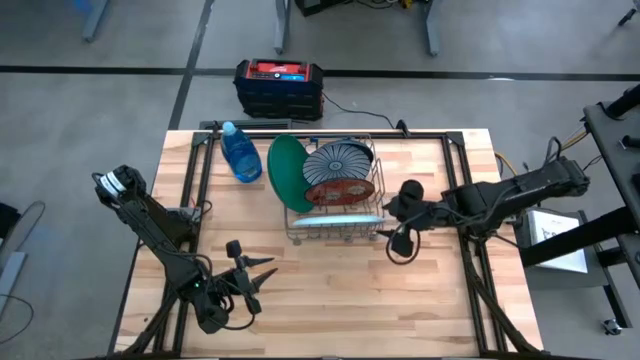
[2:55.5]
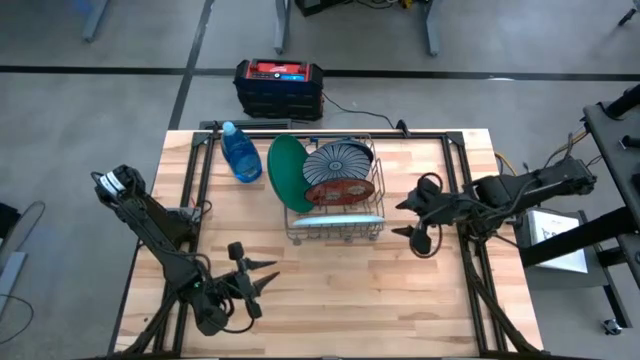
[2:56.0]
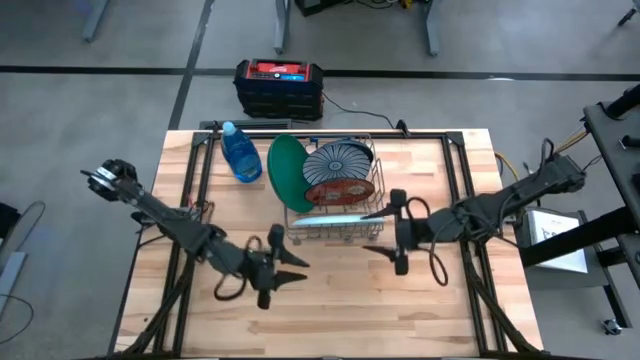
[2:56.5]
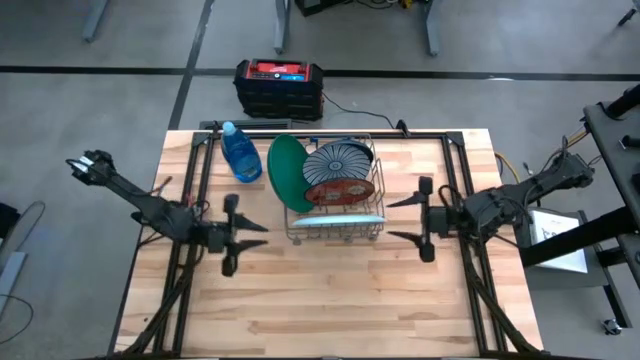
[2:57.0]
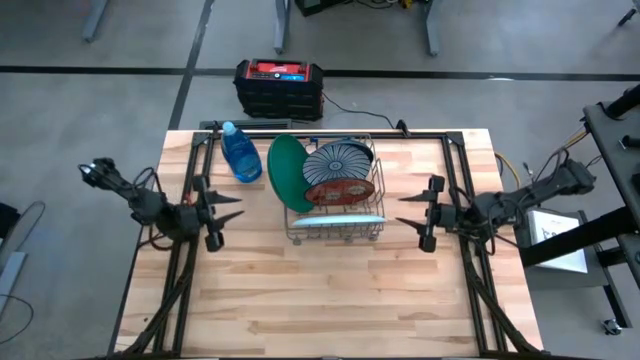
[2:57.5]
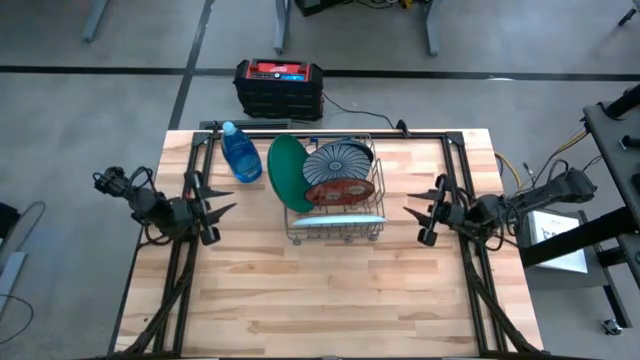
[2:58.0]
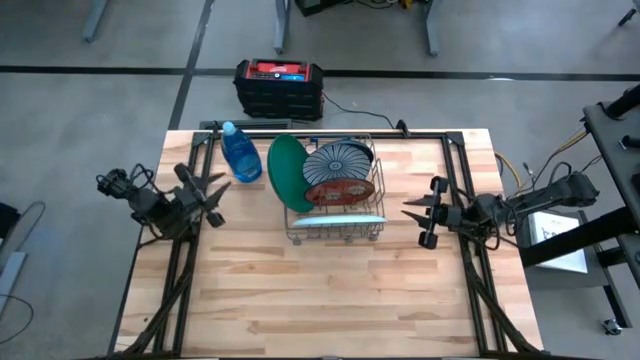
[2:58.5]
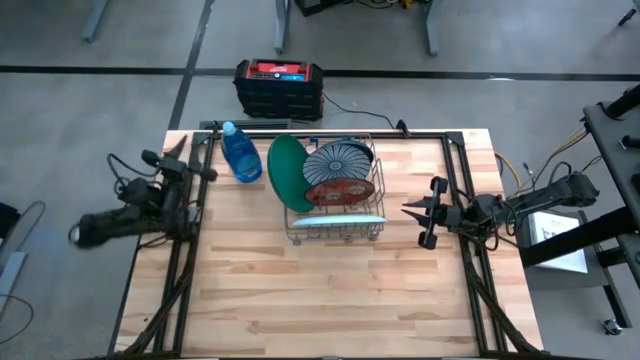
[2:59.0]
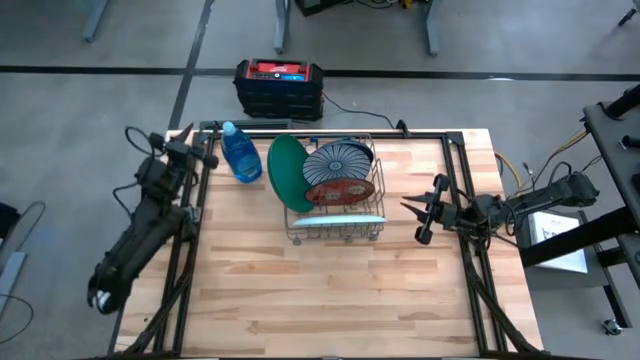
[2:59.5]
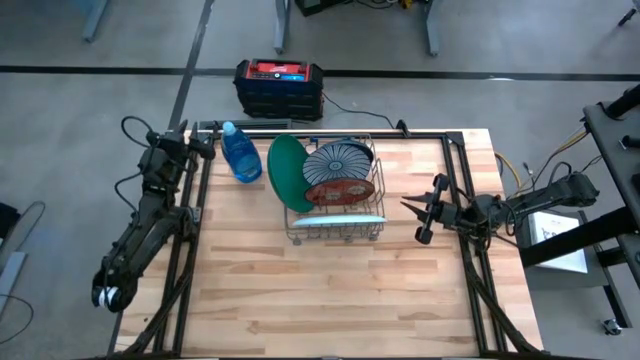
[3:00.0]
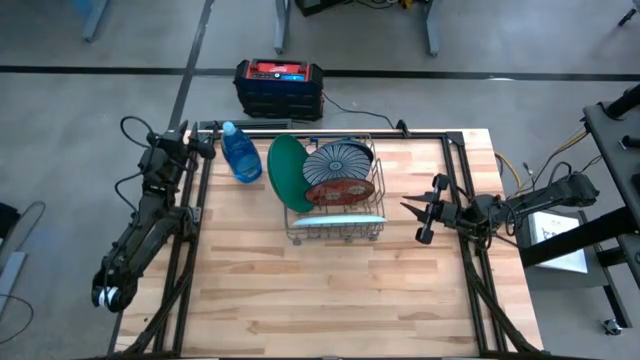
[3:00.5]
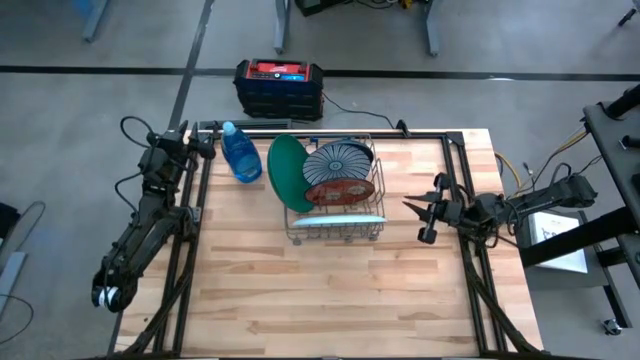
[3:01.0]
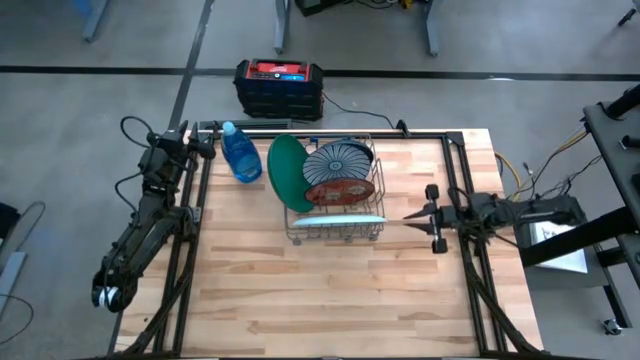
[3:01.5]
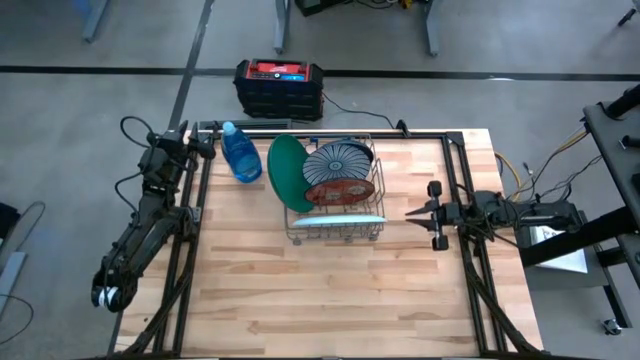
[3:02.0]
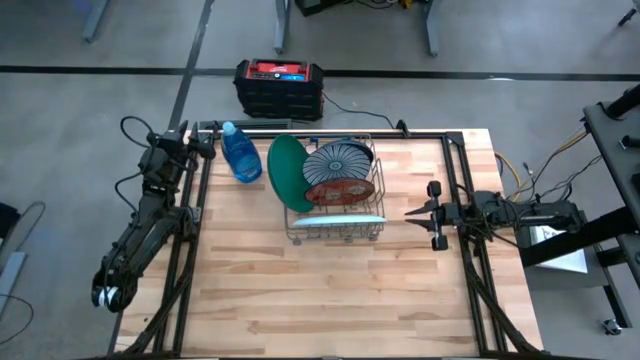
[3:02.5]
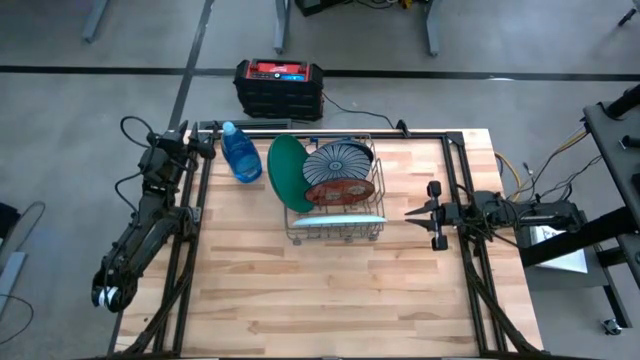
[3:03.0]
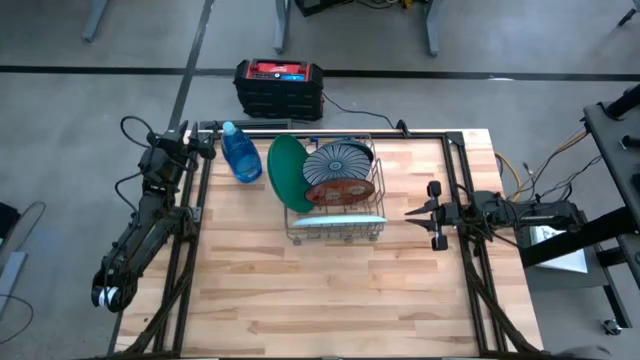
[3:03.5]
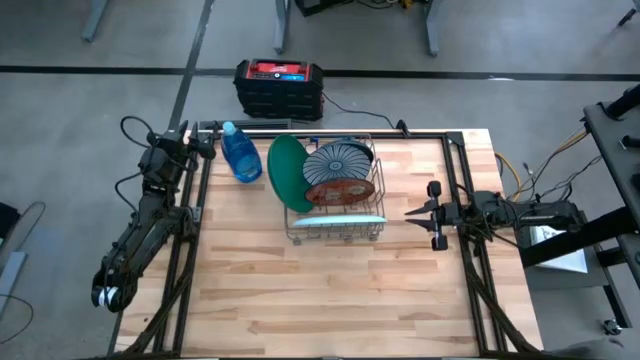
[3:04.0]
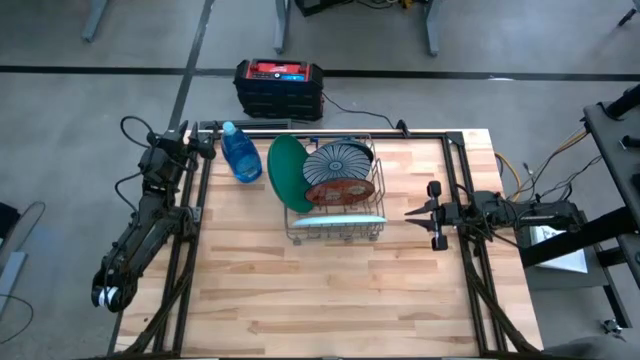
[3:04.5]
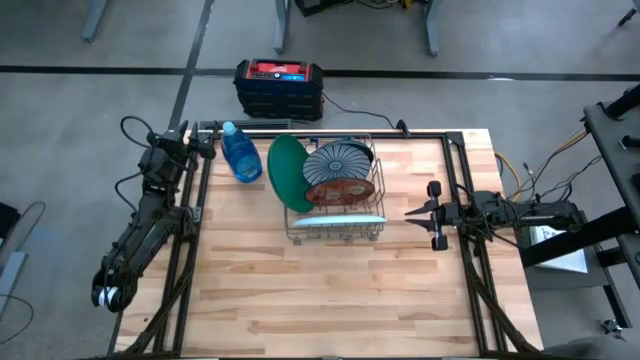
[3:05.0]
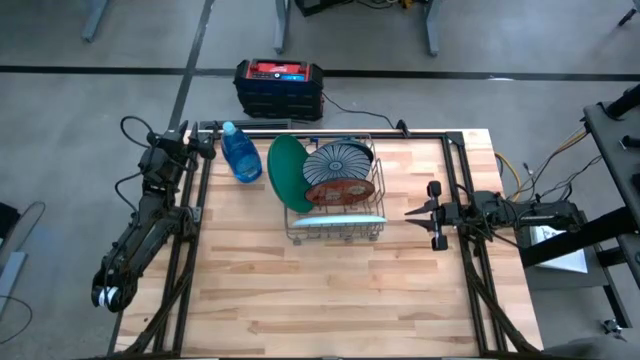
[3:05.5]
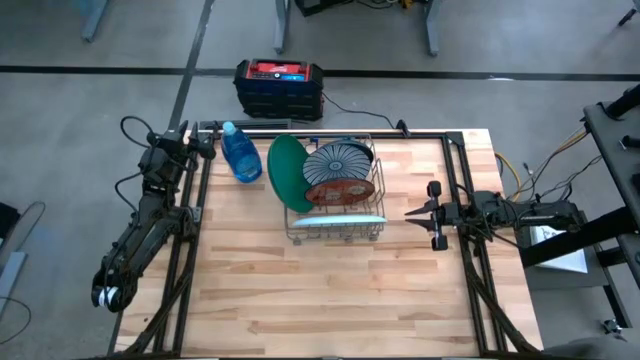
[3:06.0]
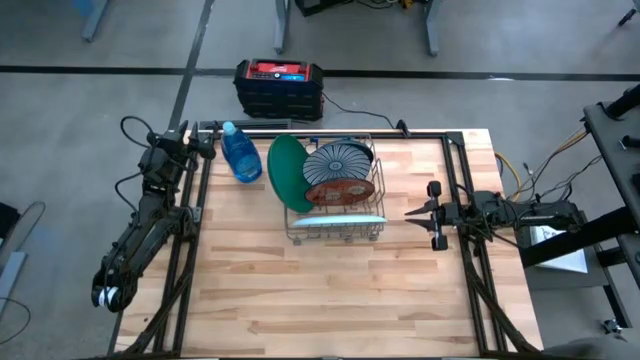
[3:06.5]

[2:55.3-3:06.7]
Task: Sort dishes
Return to Home Position

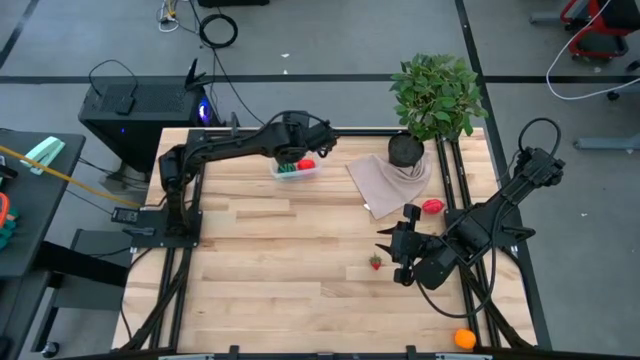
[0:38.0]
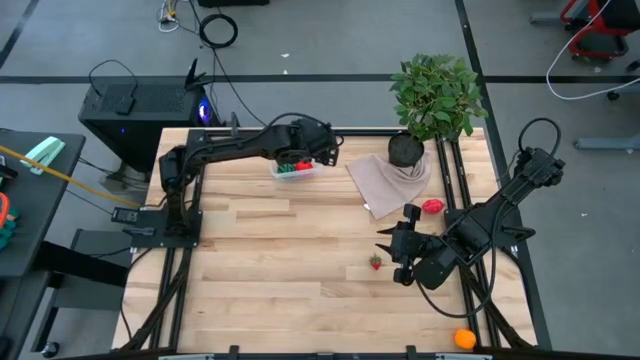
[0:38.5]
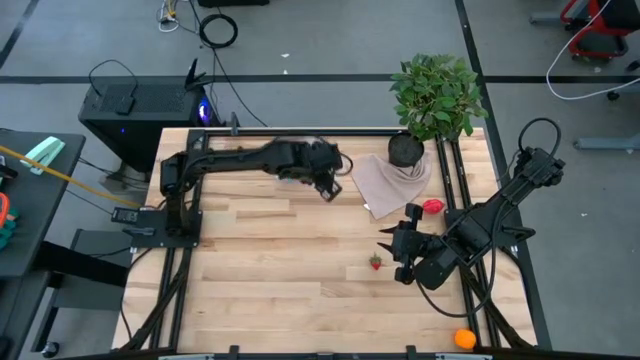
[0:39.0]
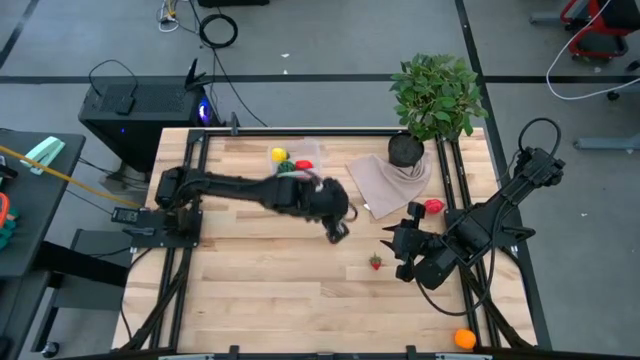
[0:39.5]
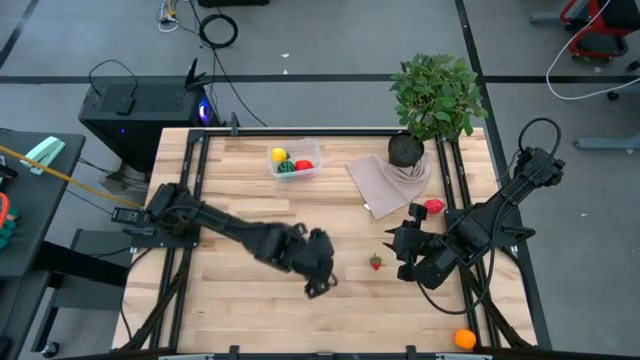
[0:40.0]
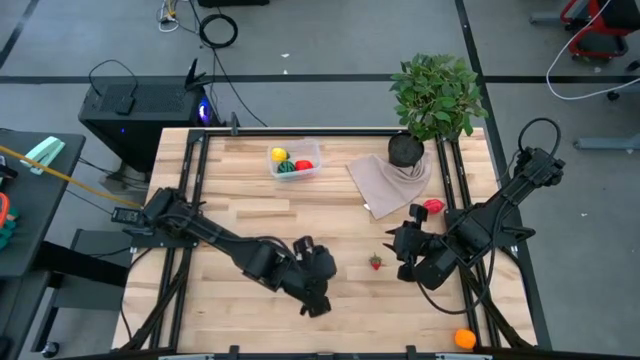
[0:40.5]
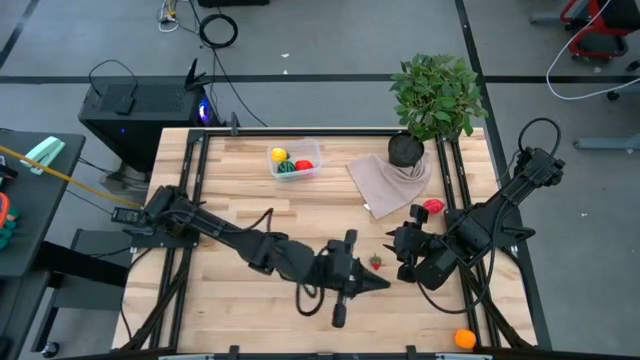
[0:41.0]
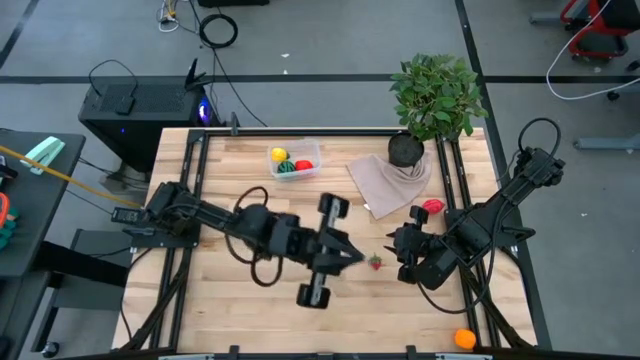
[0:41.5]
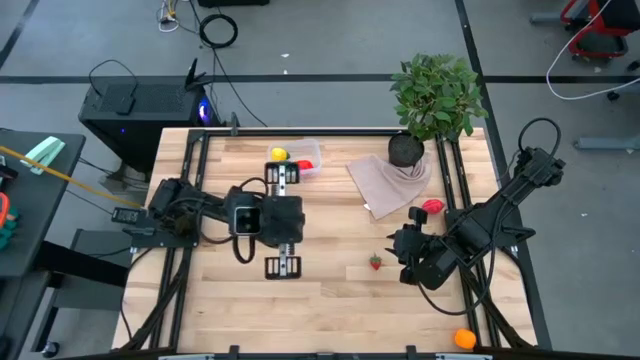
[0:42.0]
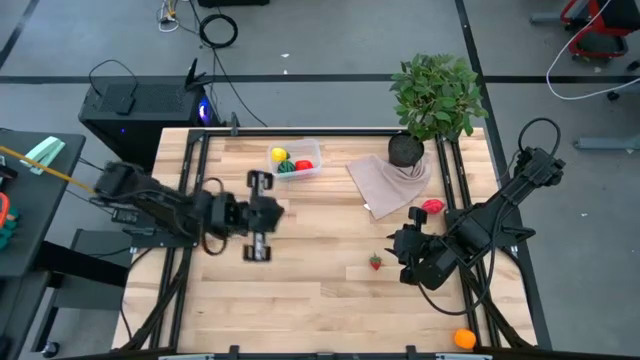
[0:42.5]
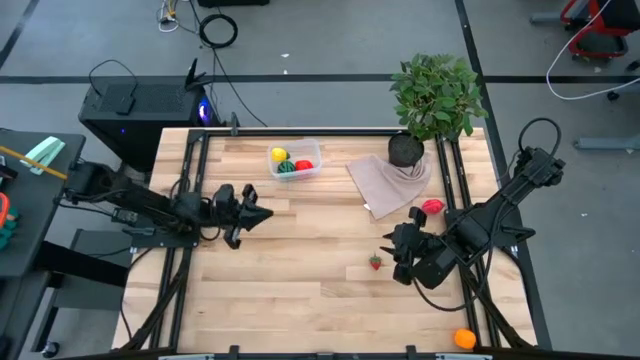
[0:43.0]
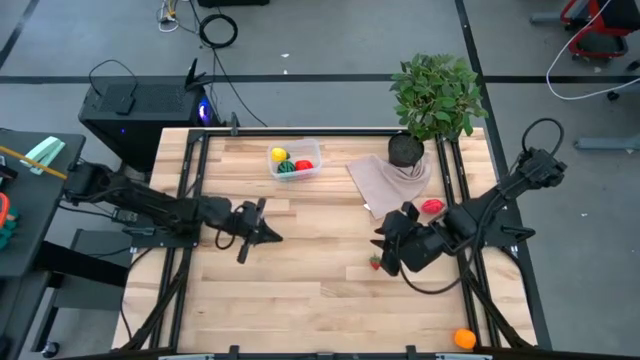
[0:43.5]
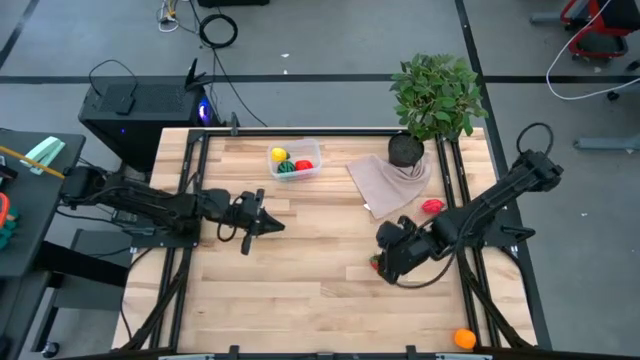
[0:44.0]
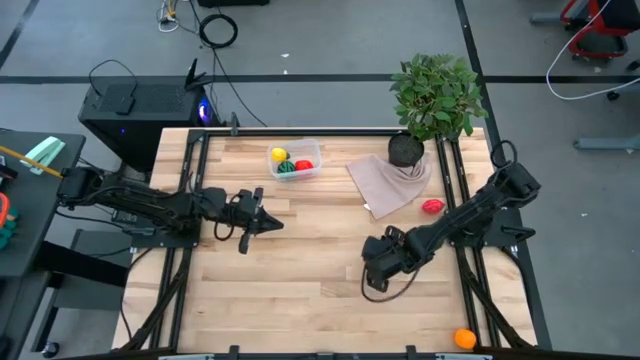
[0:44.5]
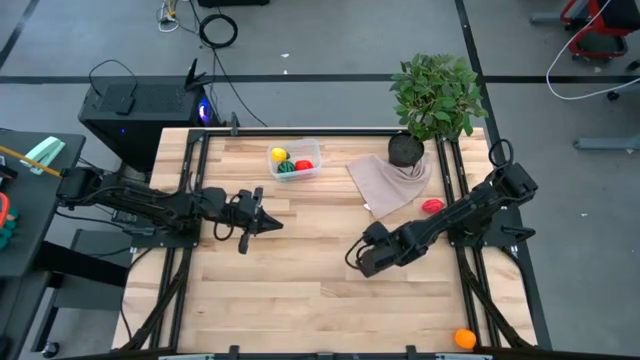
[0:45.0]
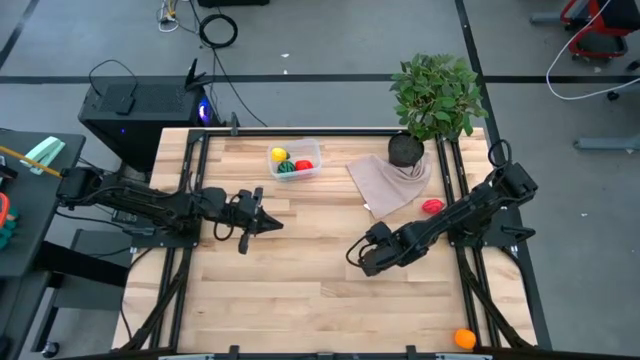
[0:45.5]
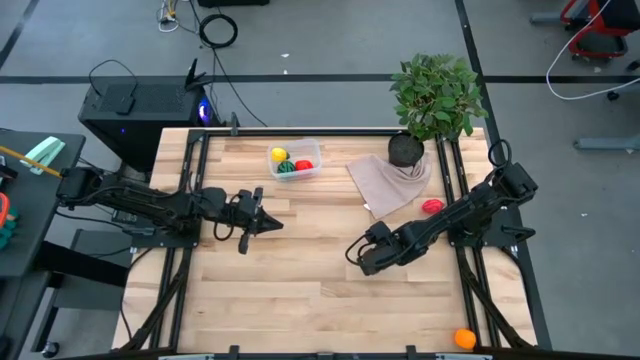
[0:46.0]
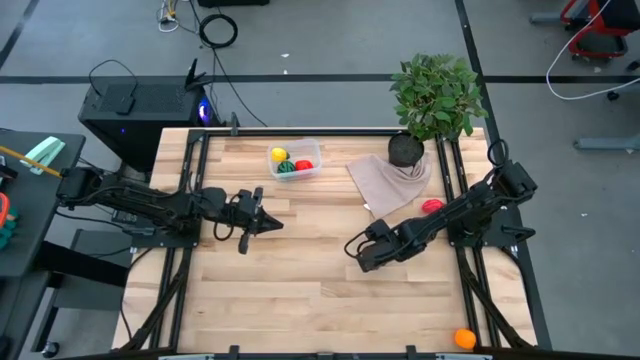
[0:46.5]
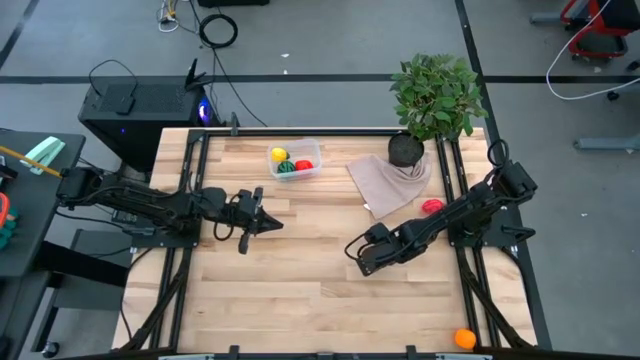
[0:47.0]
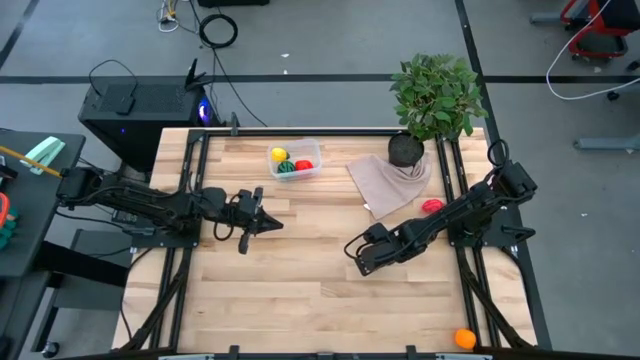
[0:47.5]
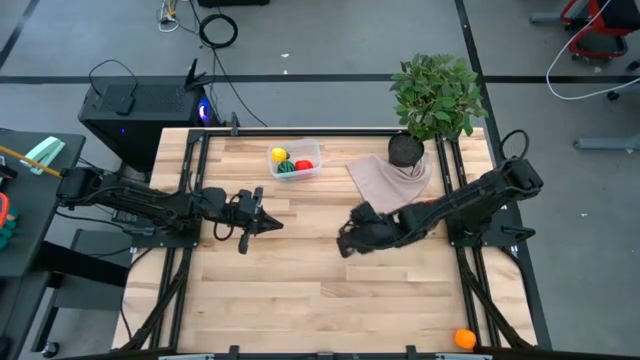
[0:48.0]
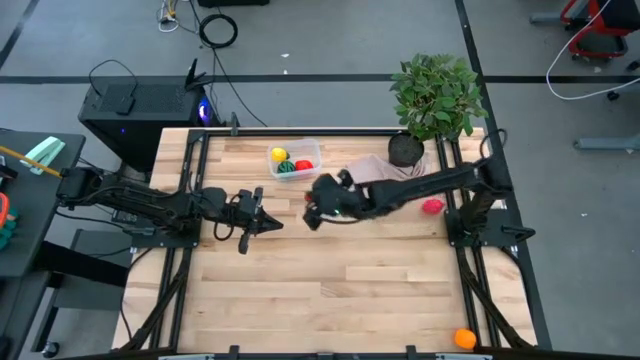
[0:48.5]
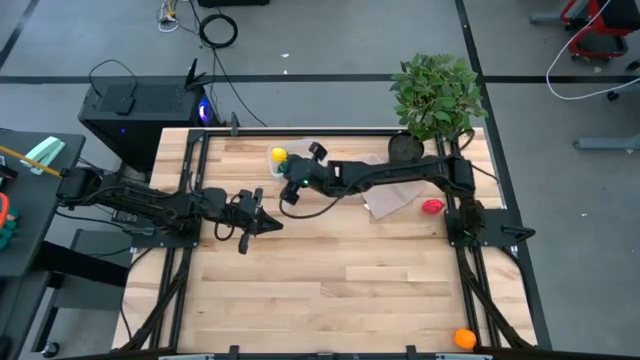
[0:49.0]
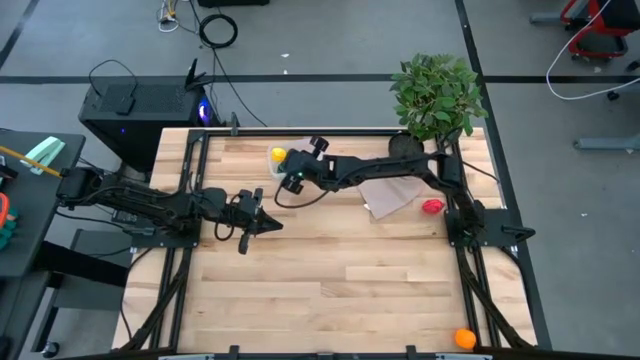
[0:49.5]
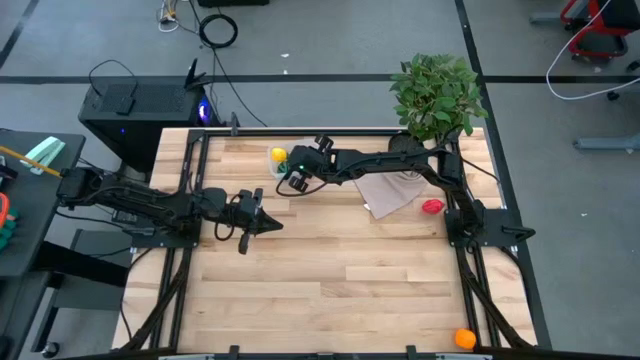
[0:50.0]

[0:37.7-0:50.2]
Task: Pick and placing Produce into tupperware
Put the red strawberry into the container
